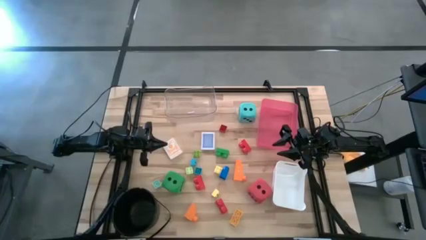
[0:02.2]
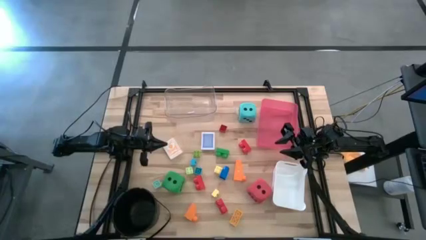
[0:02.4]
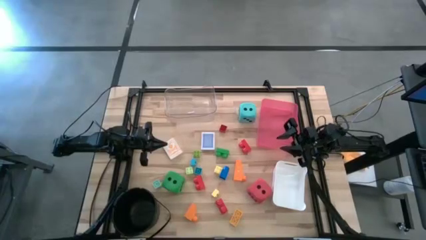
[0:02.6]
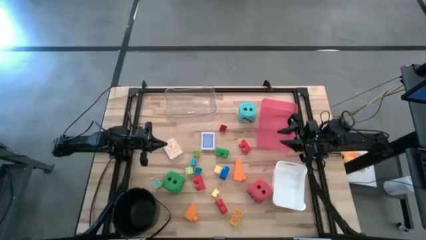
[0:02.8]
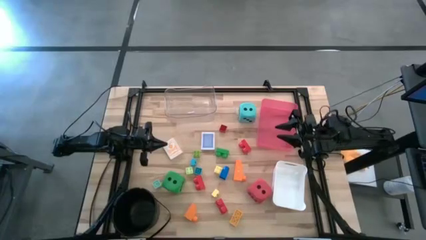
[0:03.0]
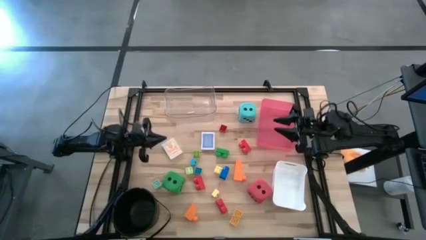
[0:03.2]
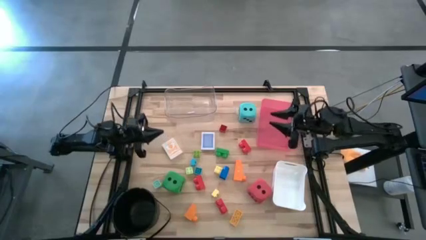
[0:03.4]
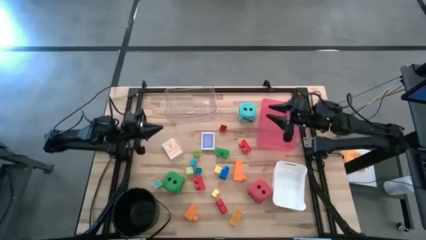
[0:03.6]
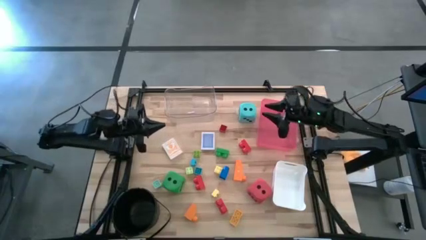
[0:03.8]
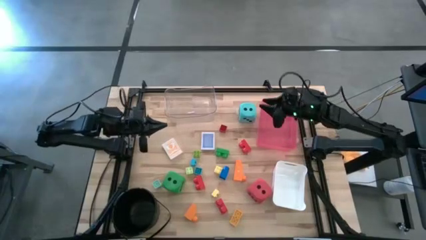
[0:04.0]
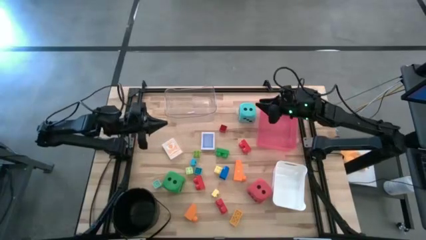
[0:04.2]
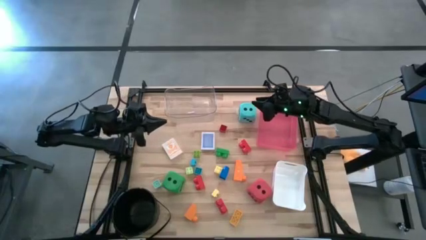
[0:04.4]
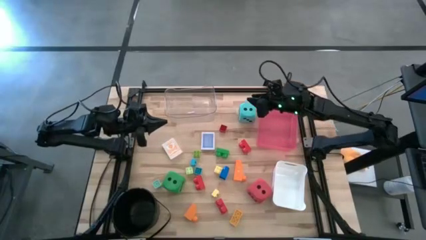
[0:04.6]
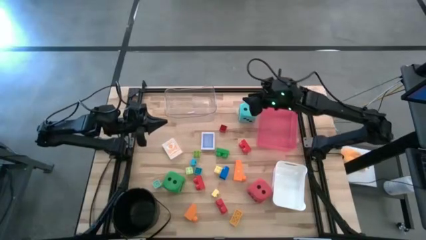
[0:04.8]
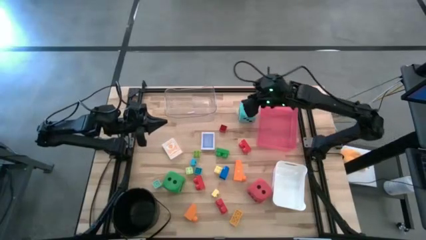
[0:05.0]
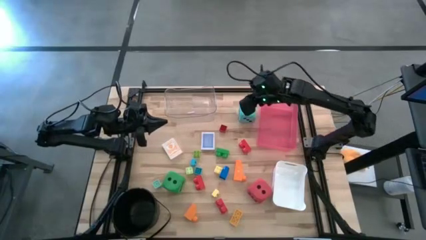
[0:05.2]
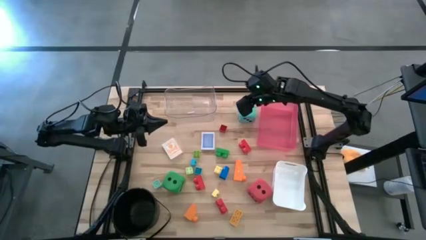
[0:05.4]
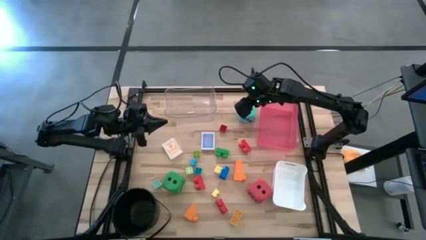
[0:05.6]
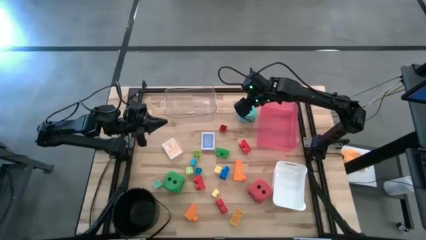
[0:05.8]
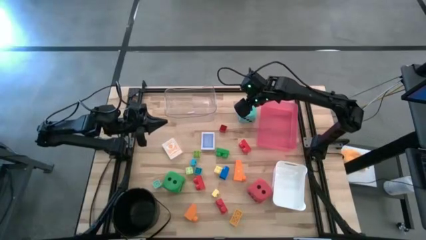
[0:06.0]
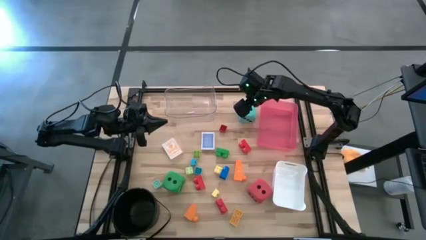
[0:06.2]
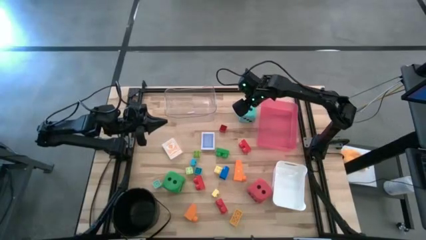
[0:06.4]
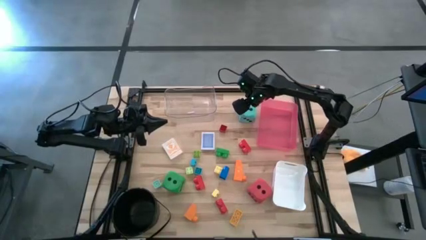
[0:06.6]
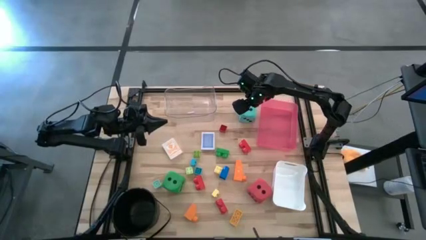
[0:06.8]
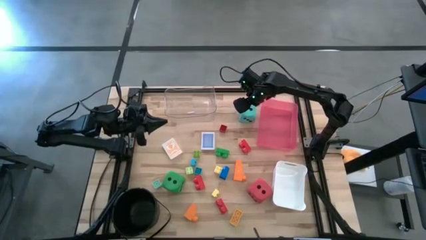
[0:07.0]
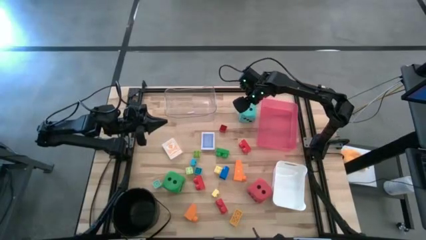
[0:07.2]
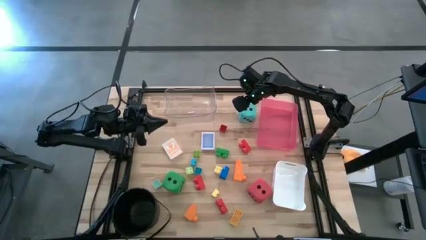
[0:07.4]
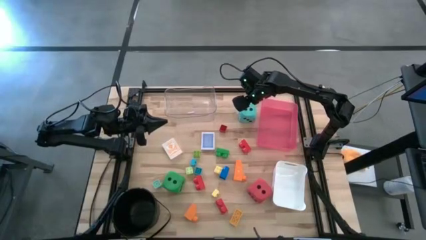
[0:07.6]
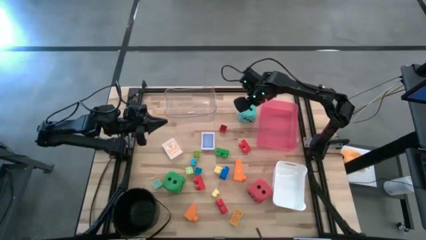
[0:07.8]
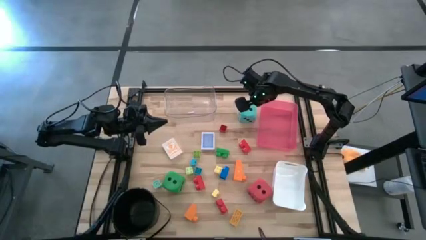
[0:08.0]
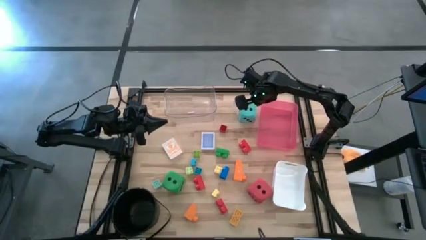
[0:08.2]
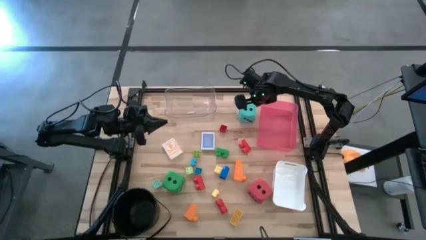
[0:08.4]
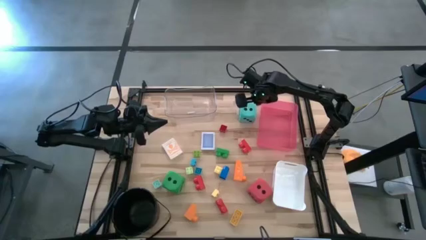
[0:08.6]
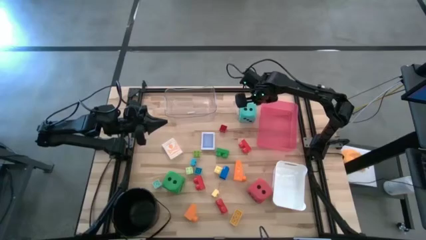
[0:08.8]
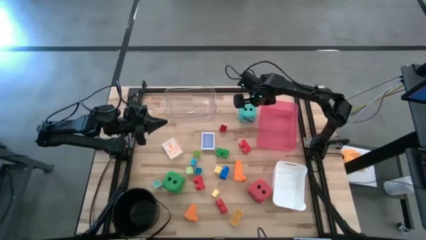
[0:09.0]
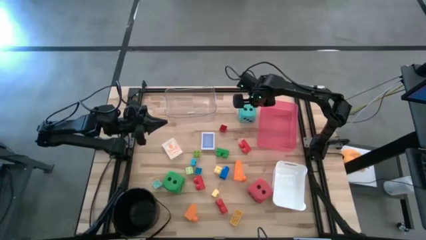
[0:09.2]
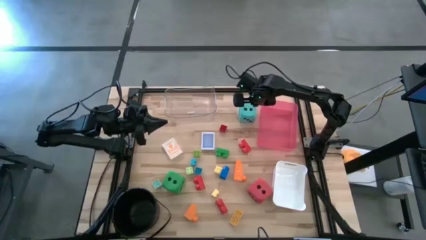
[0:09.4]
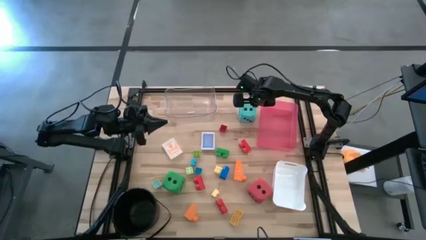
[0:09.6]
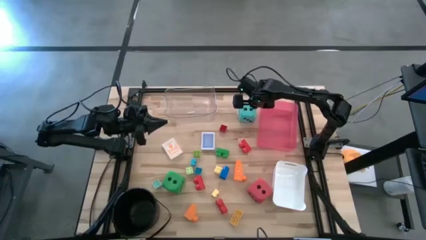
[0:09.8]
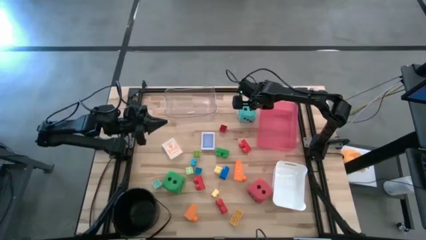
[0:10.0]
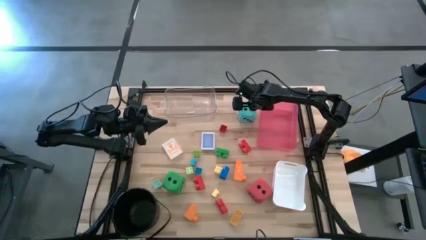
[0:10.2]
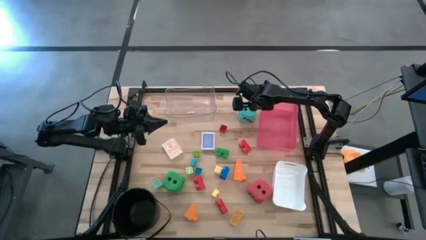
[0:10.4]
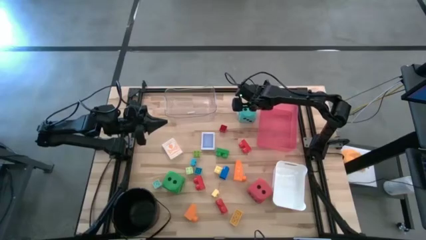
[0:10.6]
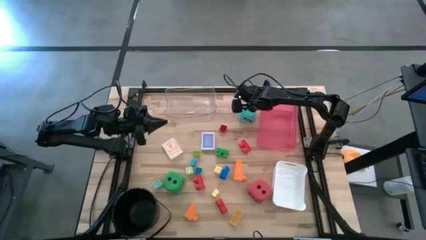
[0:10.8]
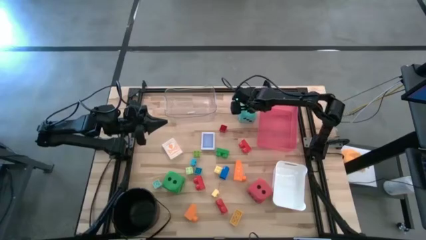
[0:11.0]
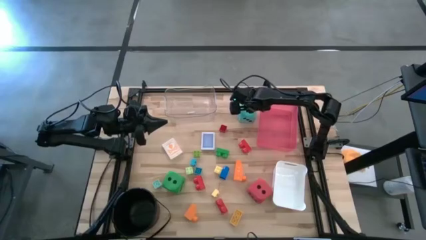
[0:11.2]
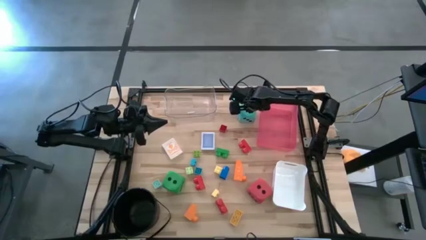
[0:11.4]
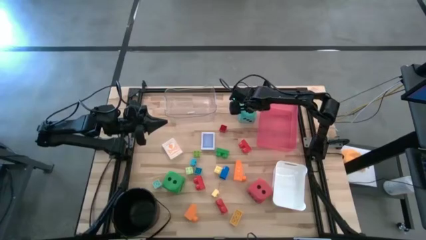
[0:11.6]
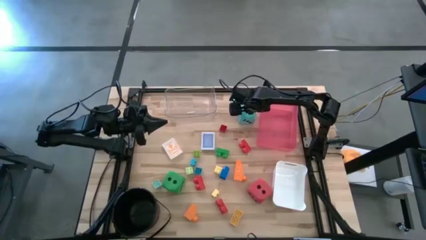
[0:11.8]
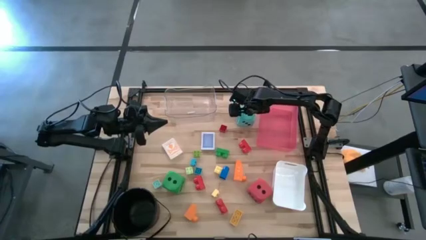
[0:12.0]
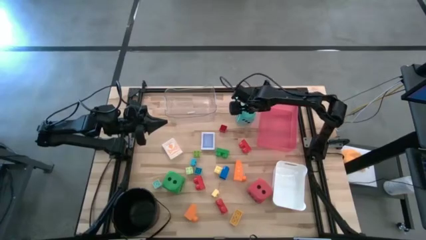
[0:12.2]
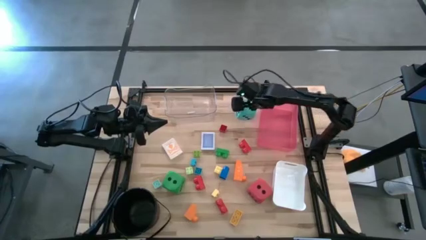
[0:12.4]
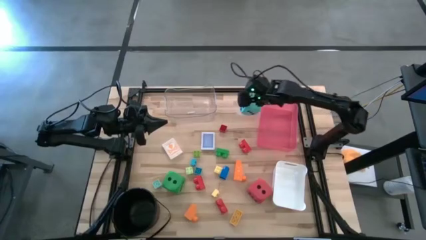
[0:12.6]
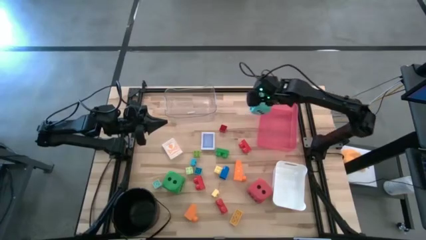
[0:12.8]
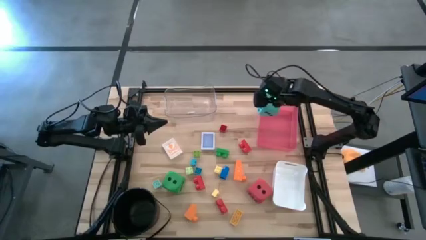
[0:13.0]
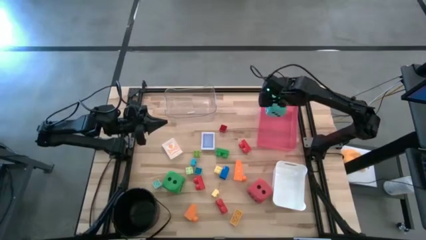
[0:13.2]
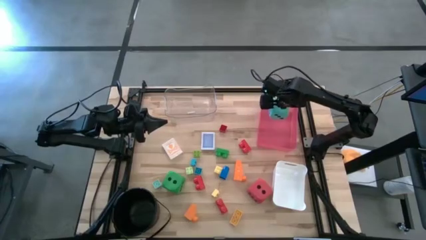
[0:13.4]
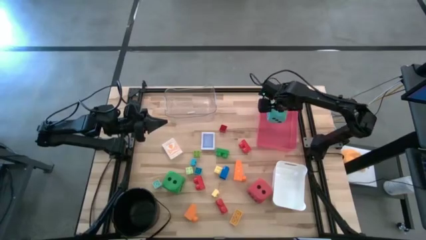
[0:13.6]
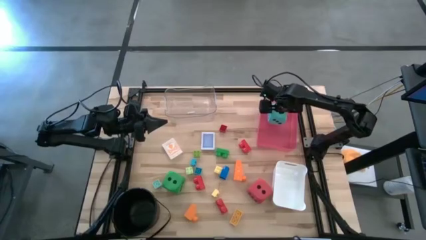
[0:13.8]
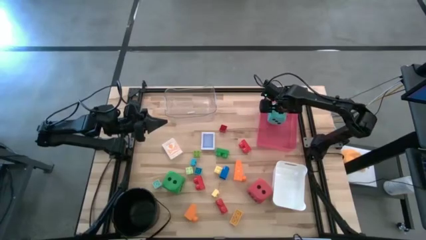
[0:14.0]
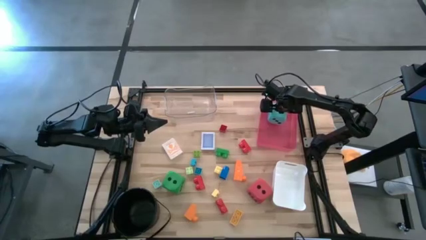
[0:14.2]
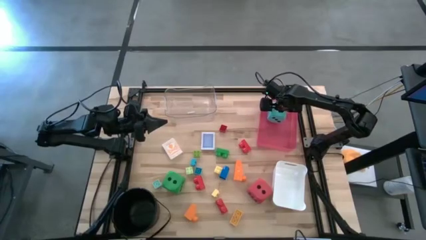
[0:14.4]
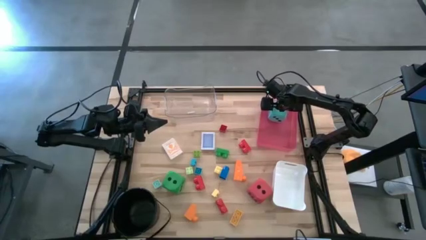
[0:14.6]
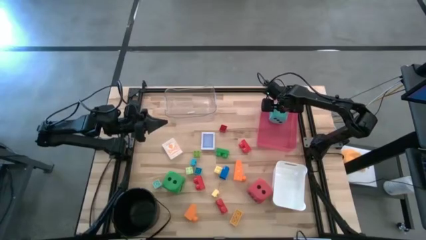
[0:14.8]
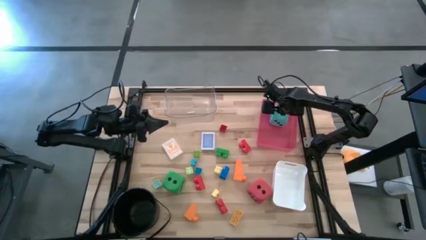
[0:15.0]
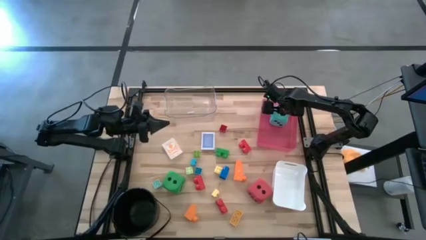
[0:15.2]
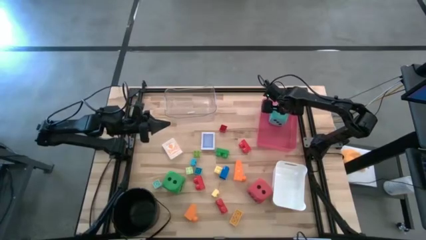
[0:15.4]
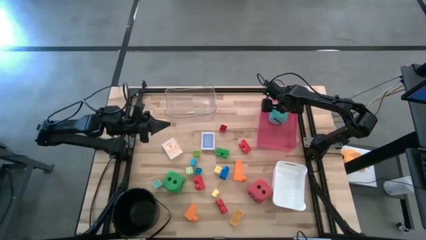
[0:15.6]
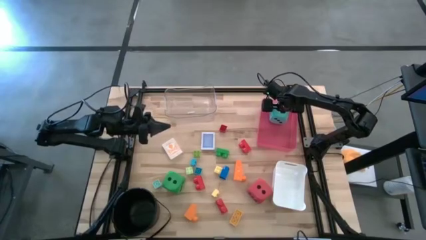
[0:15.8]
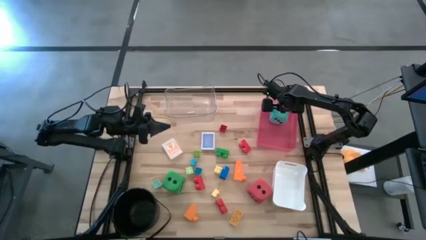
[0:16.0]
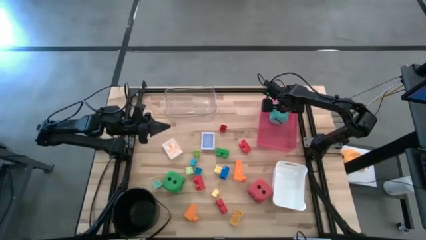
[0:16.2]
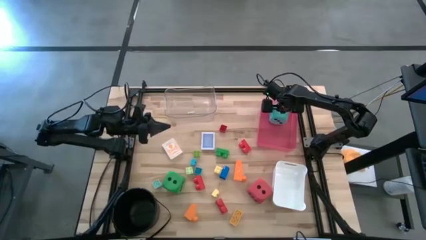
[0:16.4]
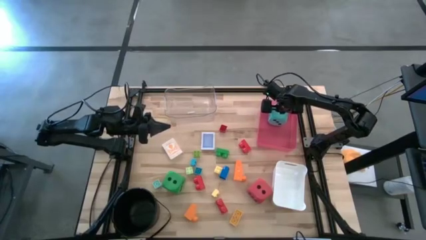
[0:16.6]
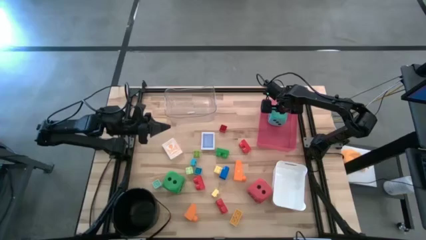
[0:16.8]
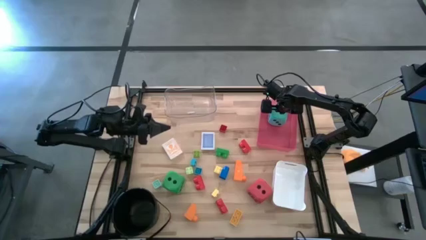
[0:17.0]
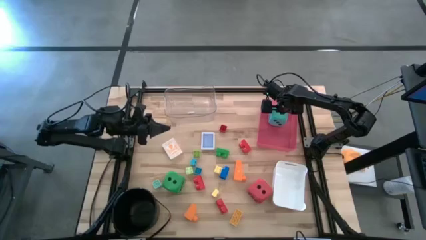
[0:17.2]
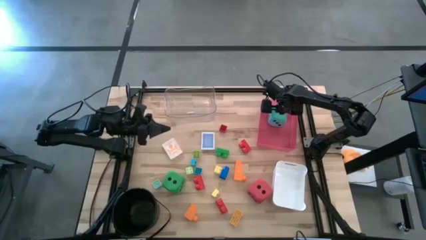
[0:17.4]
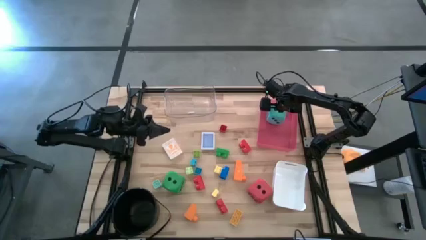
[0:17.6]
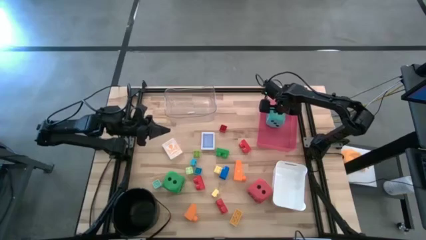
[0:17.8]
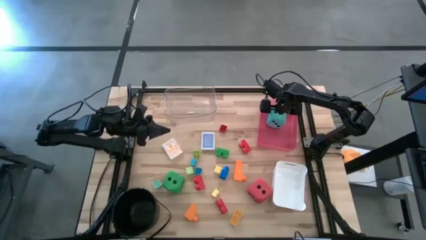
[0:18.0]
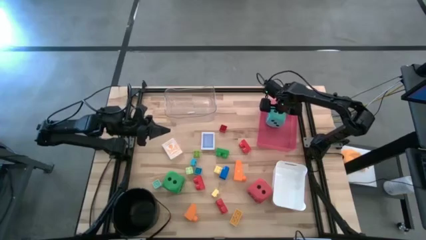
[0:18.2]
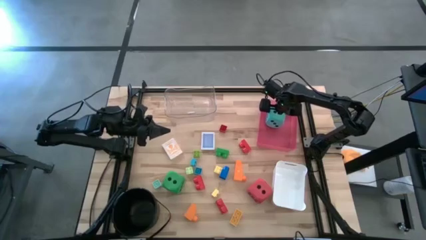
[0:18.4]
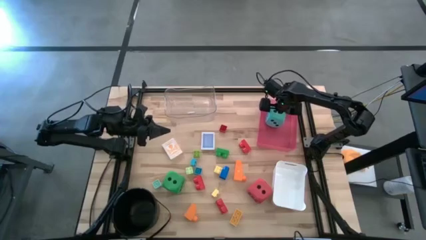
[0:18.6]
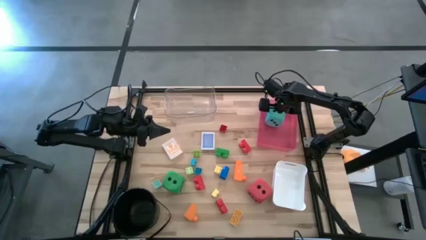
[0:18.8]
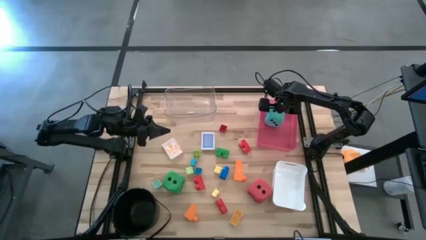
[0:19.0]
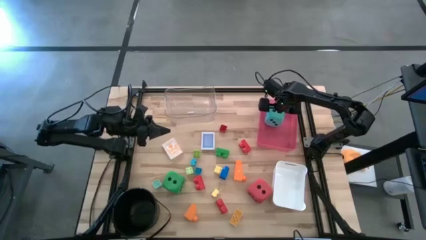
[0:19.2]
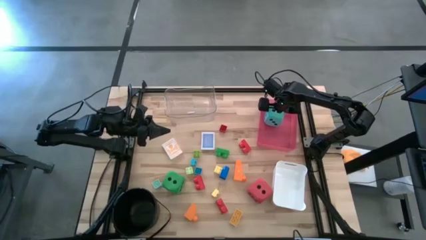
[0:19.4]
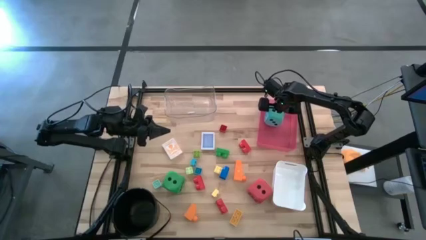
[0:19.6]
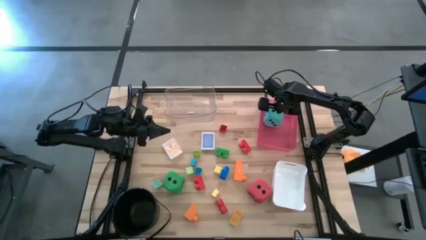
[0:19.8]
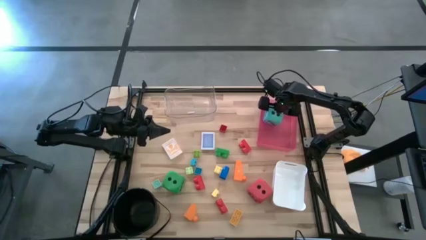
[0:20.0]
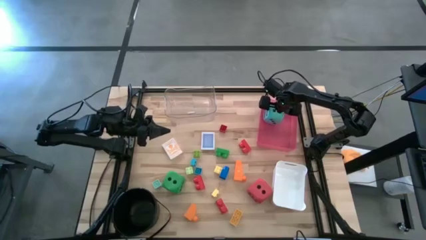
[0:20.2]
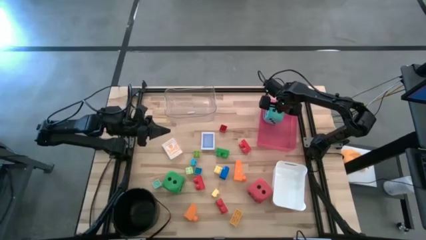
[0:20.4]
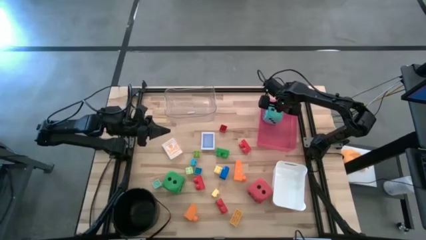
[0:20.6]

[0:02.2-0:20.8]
Task: Pick & Place Toys
Put the blue dice into the red bin
